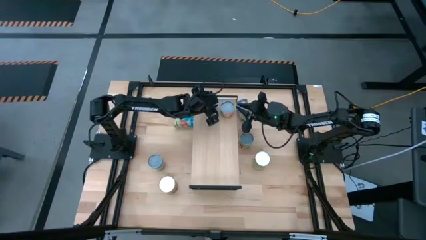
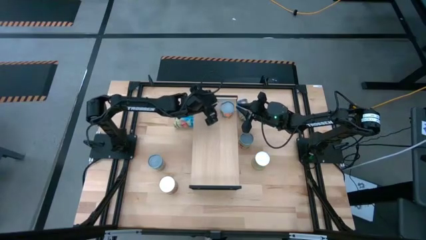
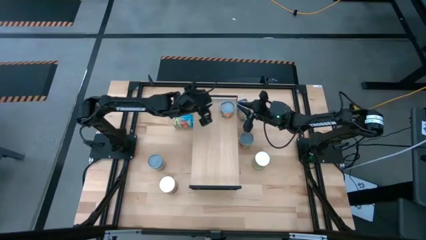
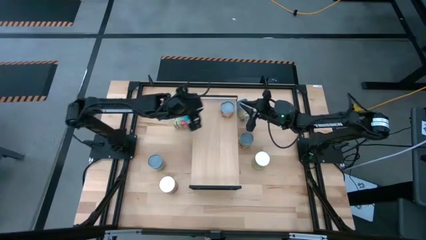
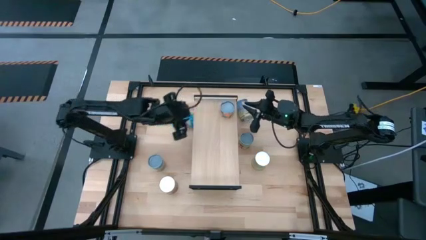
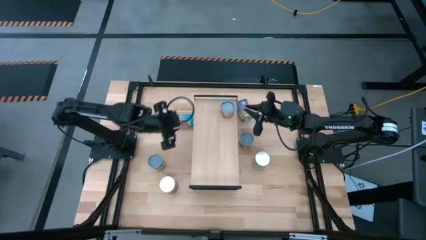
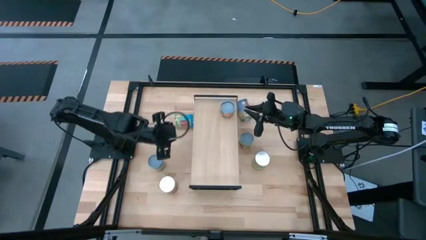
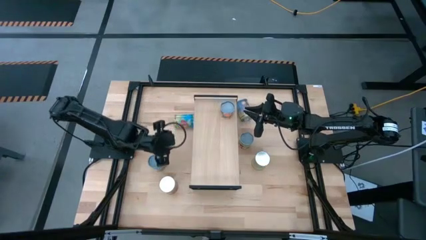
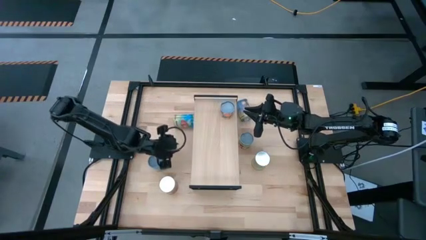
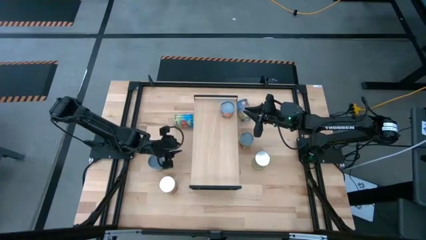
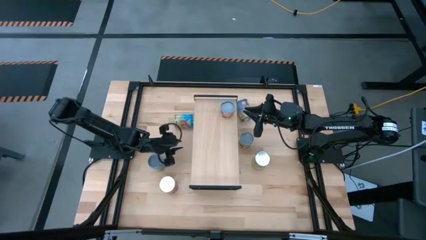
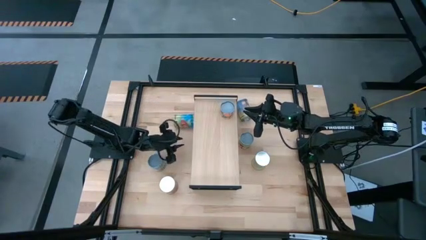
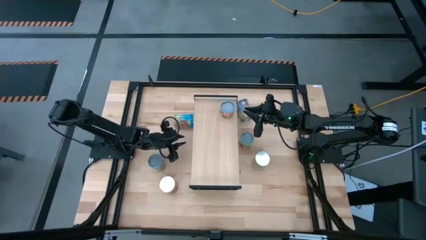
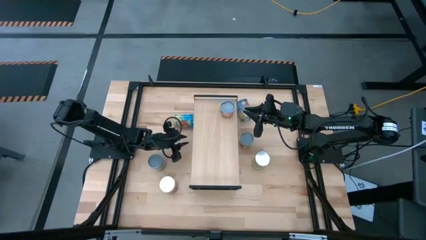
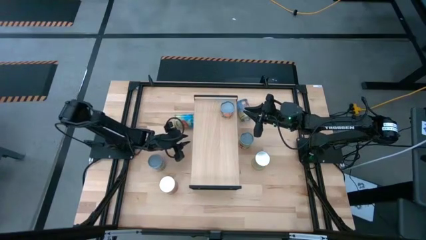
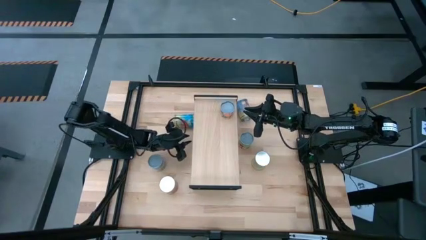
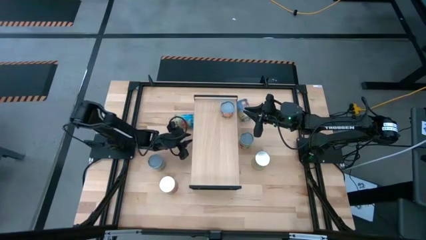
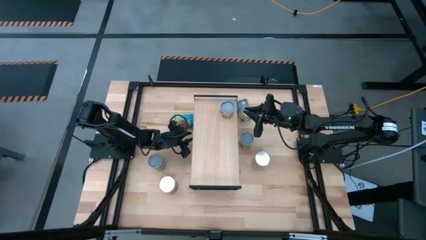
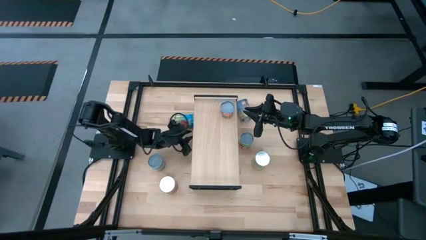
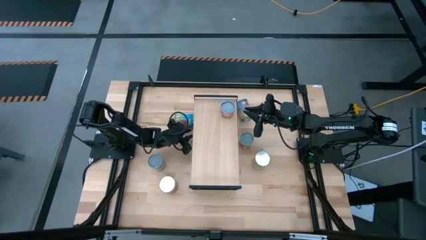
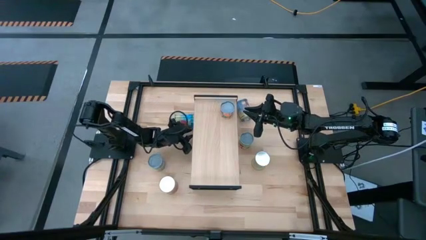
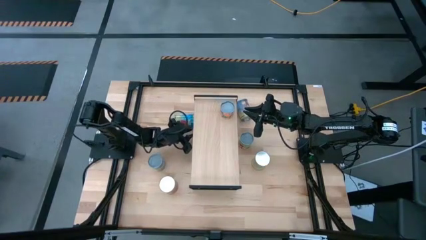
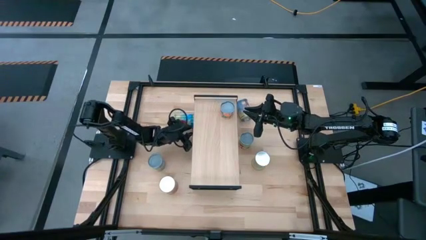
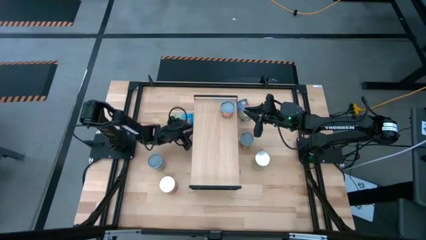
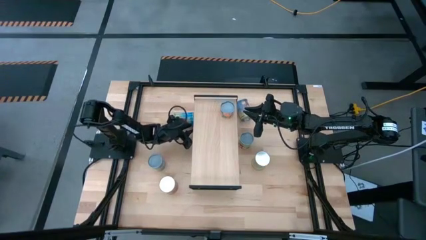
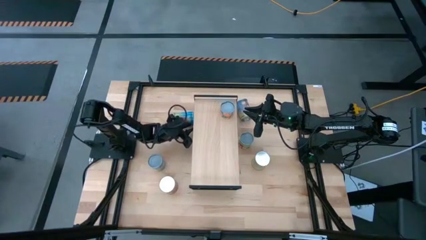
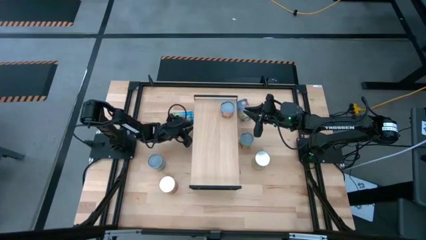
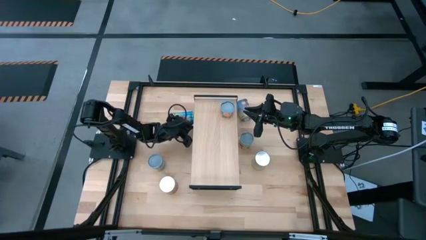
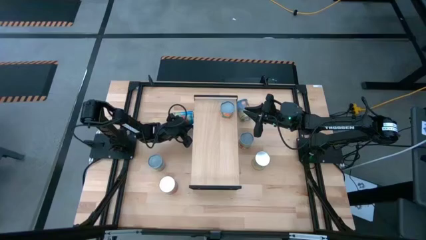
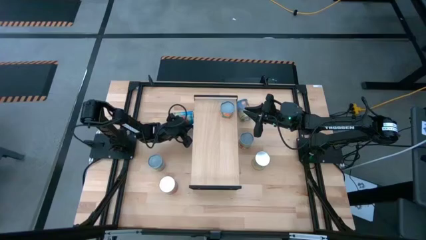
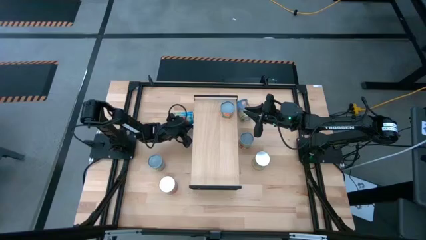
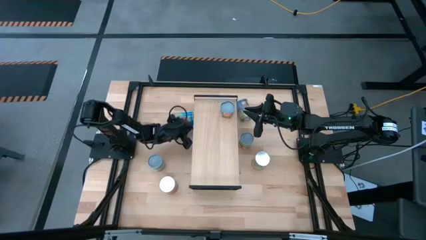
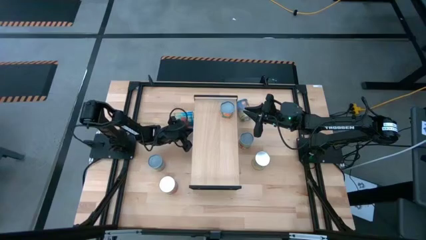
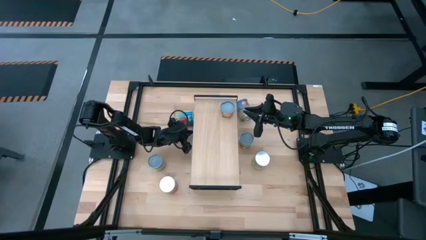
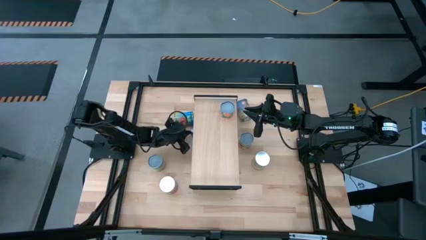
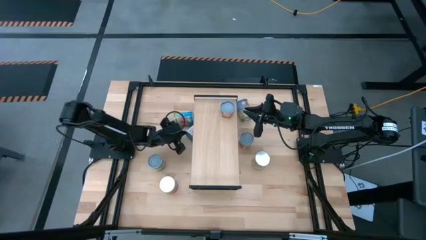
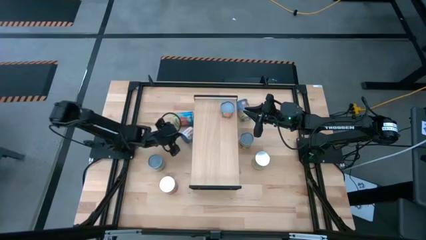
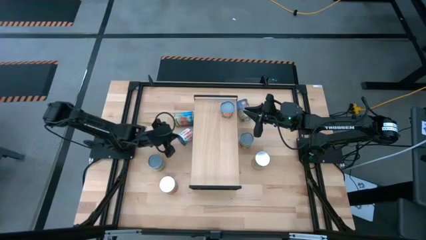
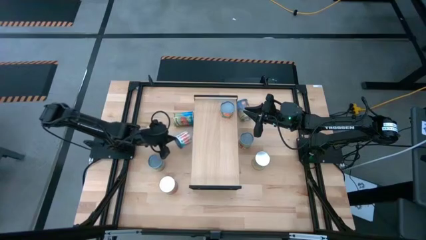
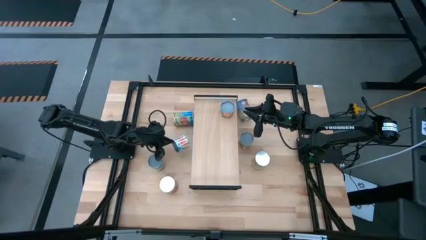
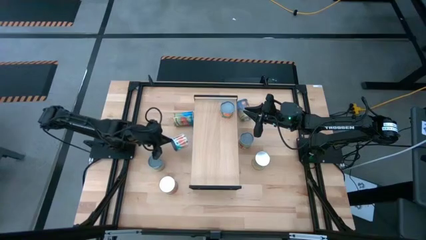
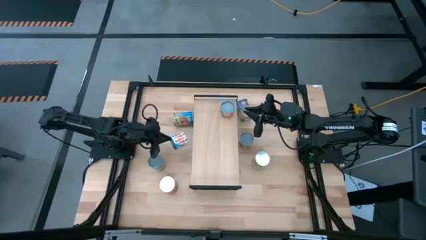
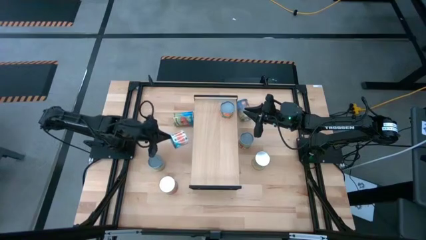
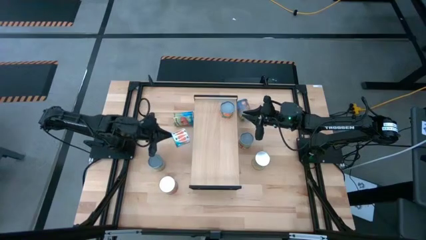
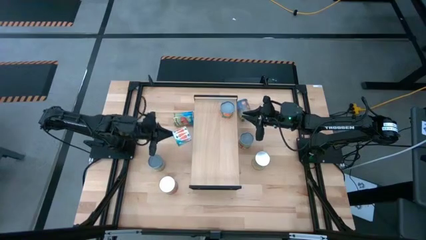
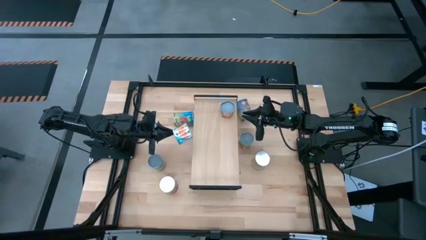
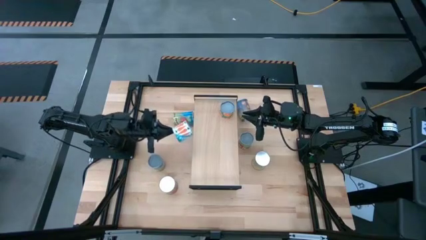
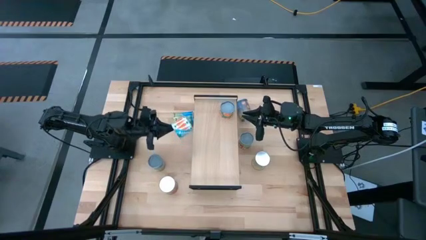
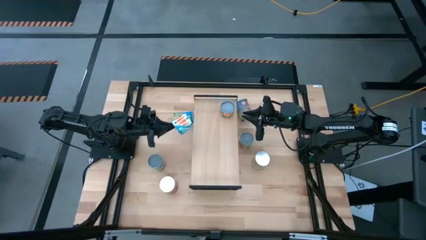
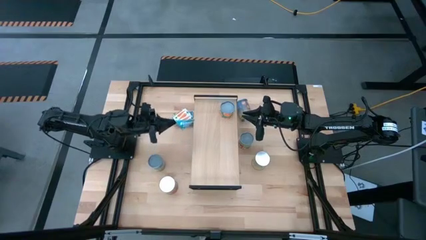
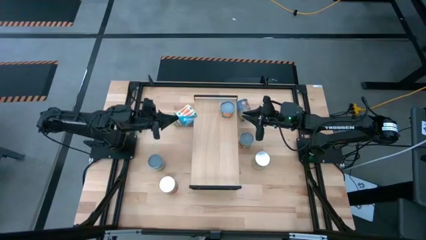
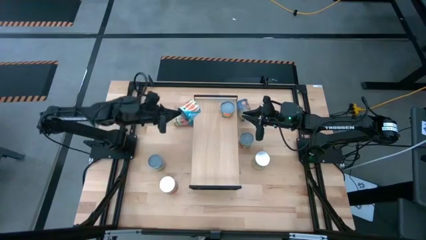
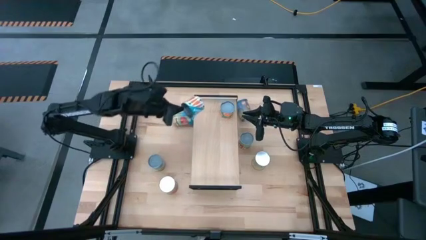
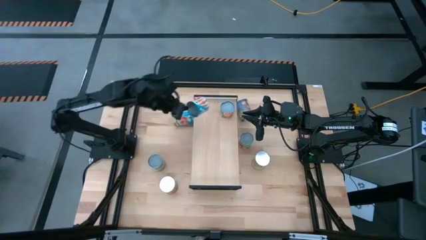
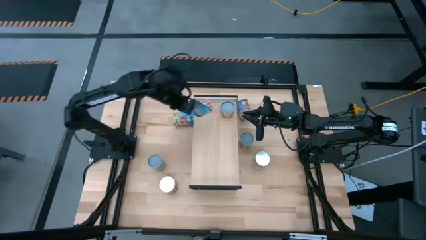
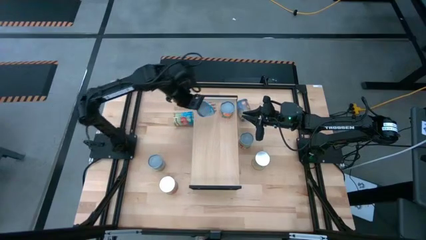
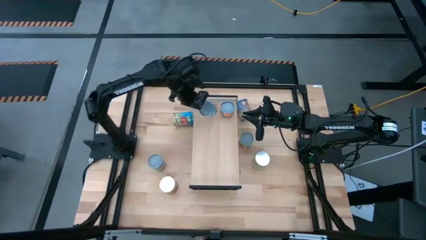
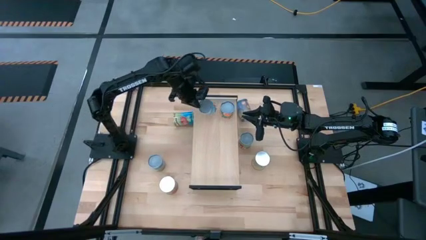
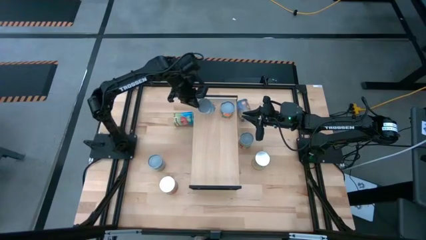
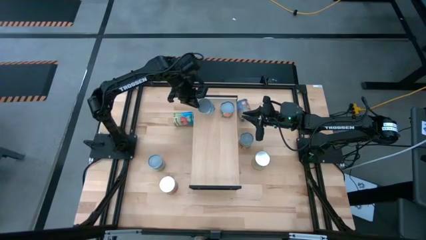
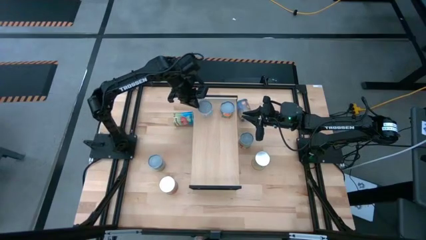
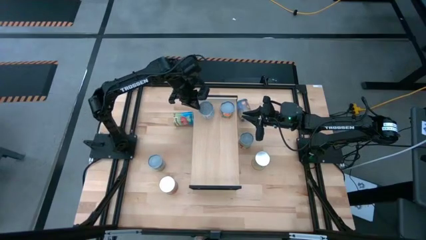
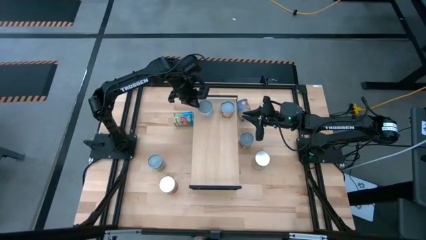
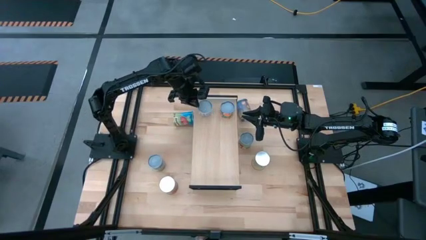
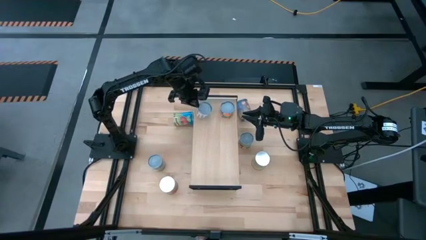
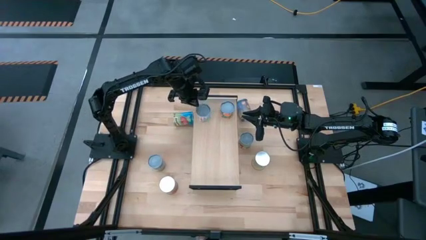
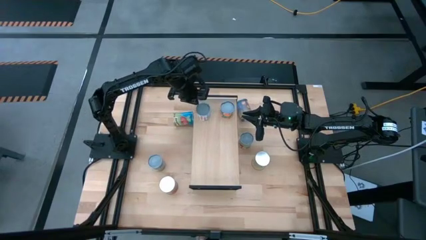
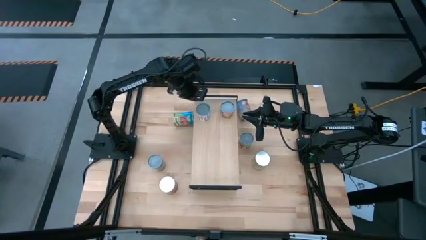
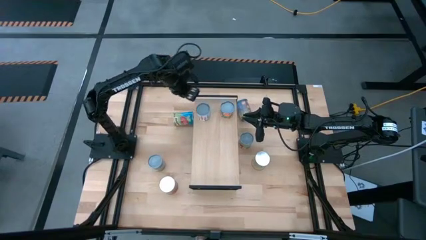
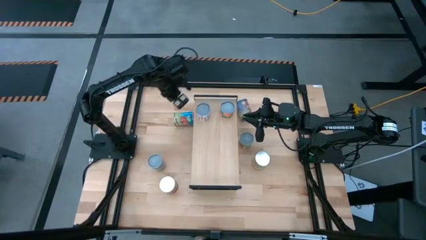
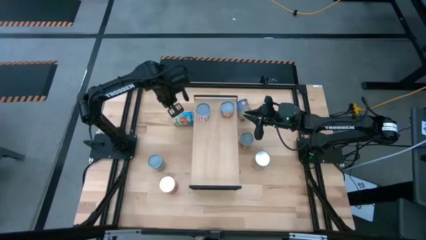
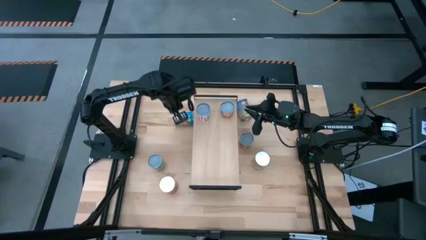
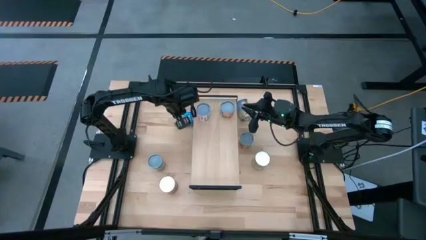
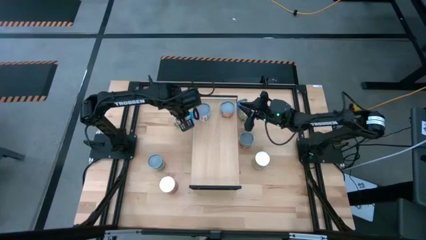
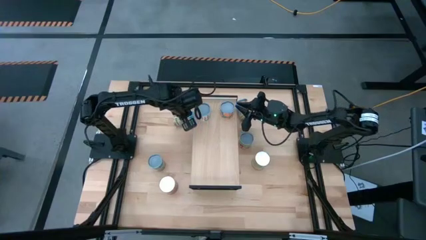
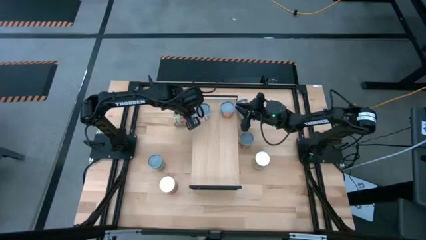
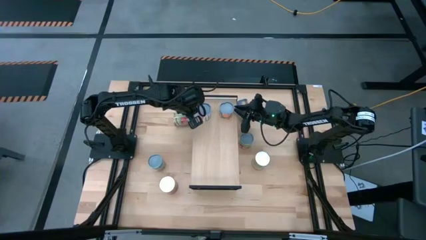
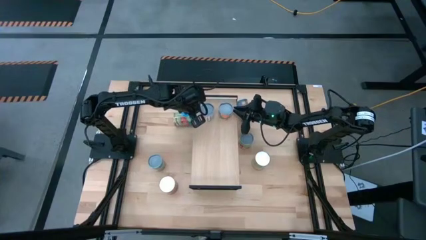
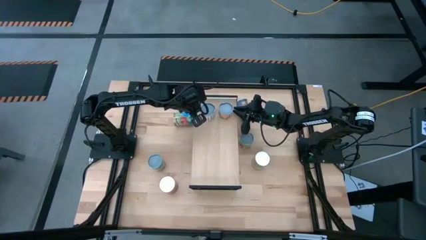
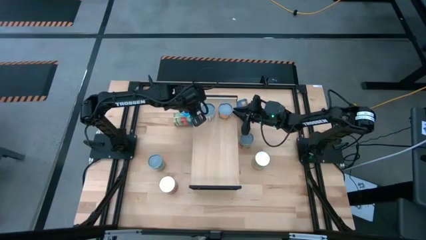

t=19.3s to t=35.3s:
Task: Pick and place cans onto a shelf
Put the small canned carrots on the shelf
